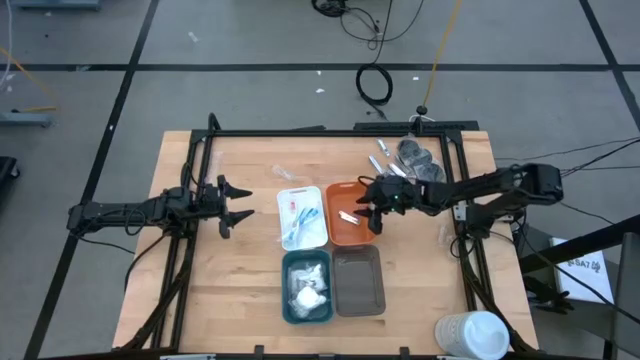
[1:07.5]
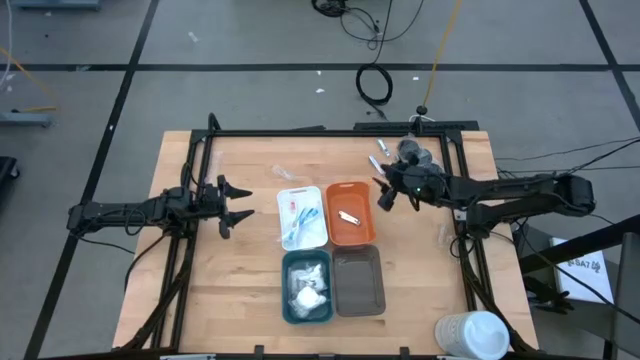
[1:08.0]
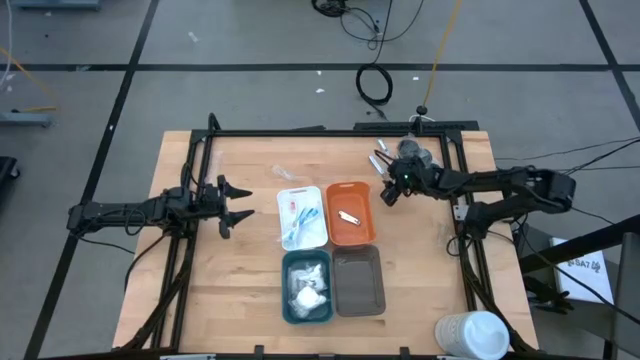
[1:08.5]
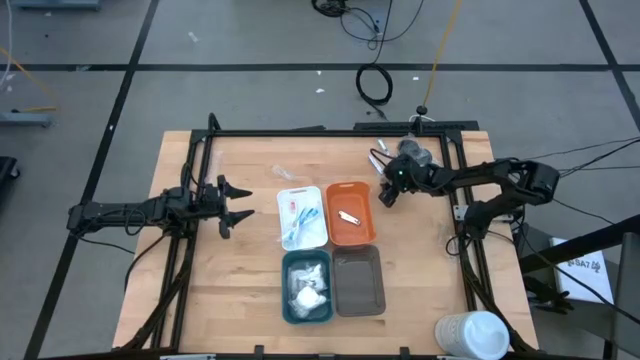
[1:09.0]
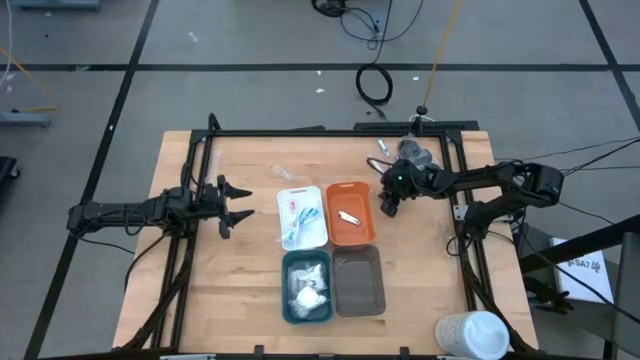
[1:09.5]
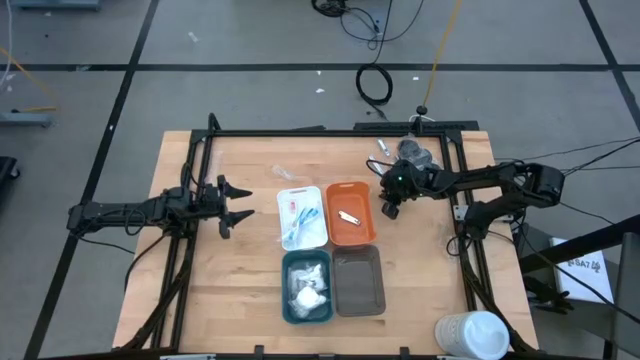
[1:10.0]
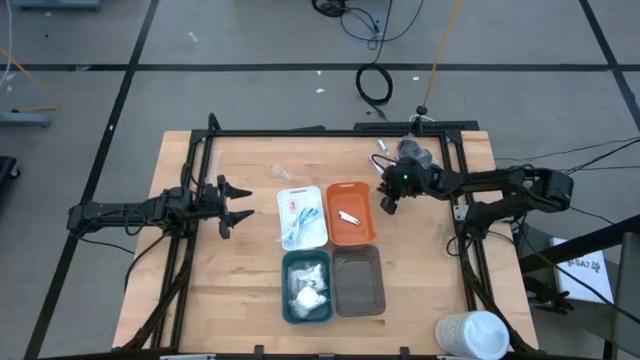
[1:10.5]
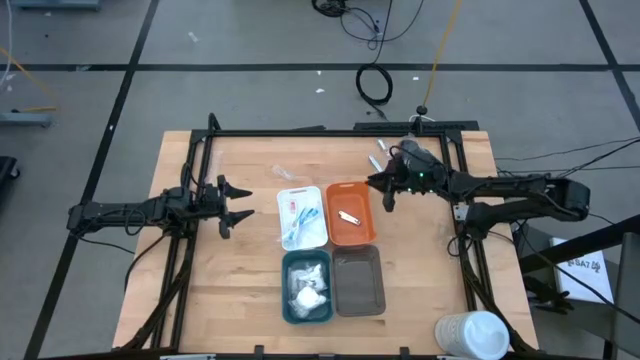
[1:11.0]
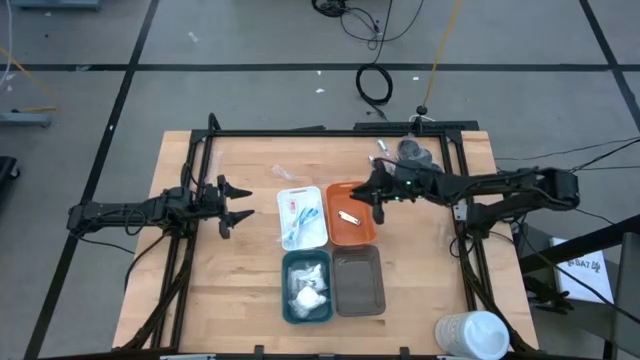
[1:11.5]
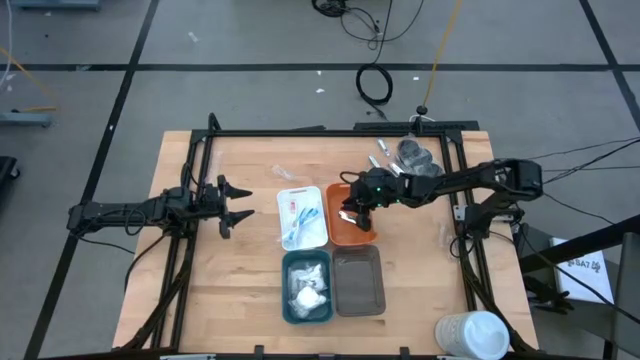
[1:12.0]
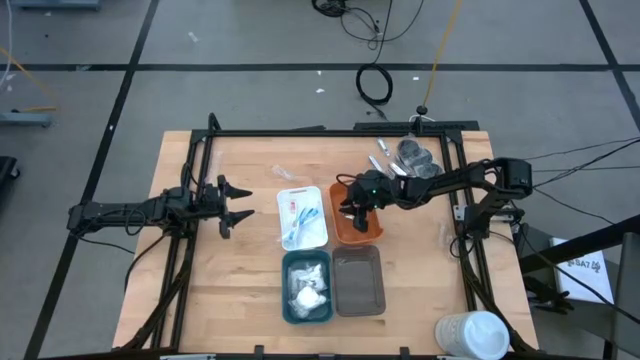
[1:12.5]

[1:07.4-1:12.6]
Task: Pick & Place Travel size toiletries
Put the nail cutter into the orange bin

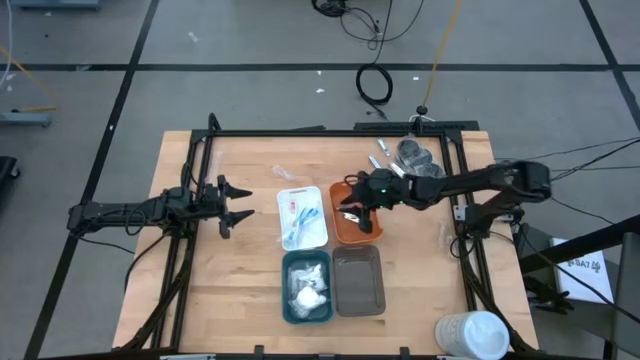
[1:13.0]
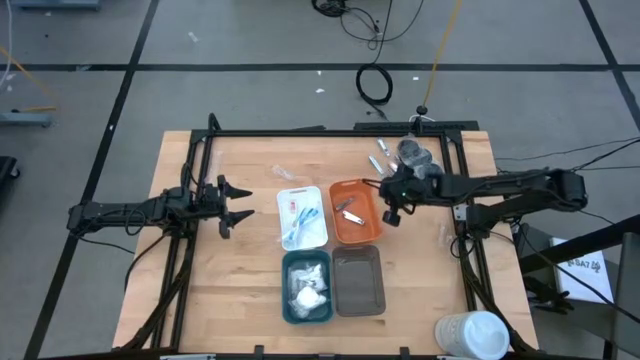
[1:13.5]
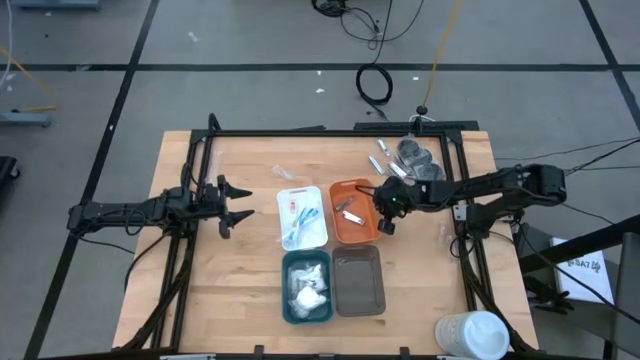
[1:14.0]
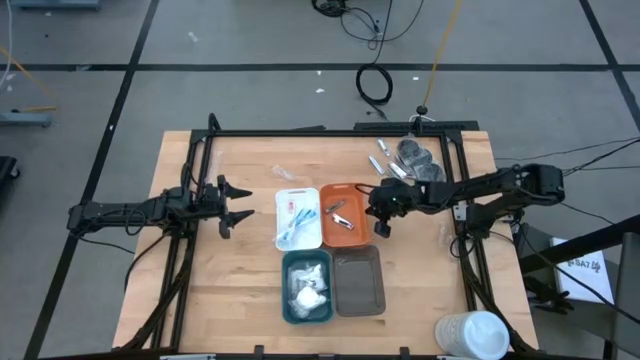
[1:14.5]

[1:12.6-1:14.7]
Adjust the orange bin on the table

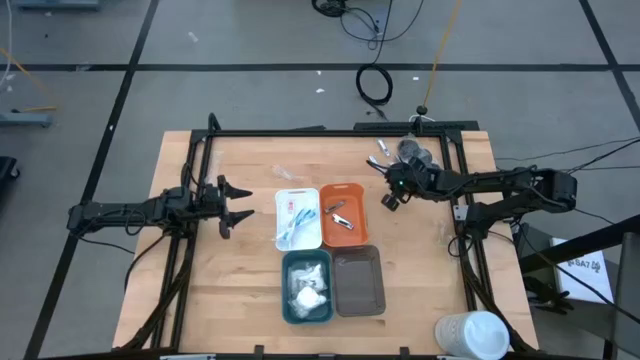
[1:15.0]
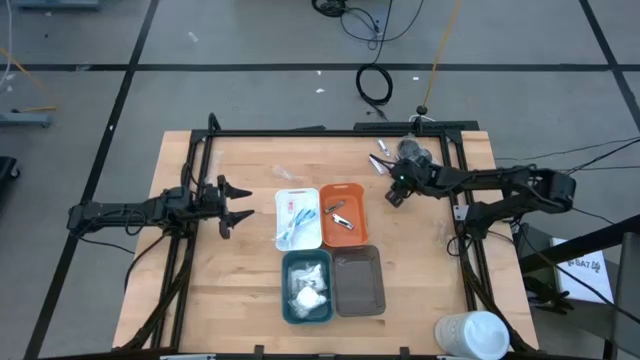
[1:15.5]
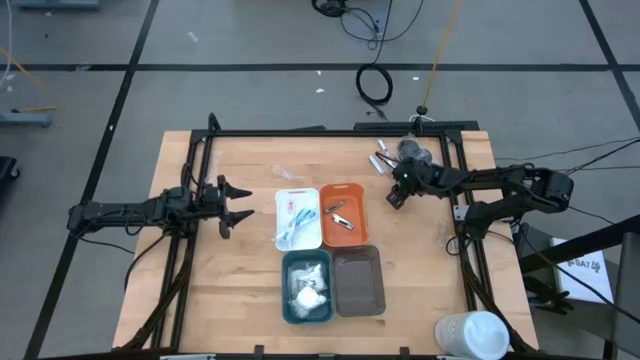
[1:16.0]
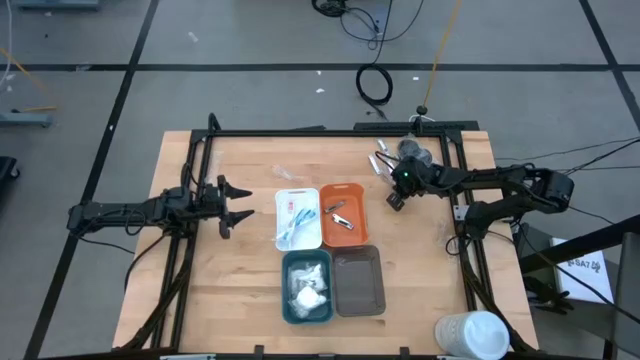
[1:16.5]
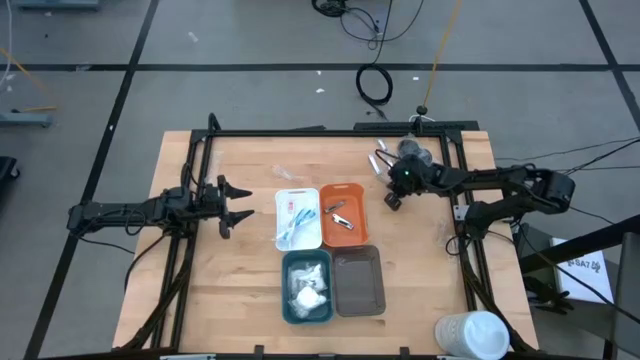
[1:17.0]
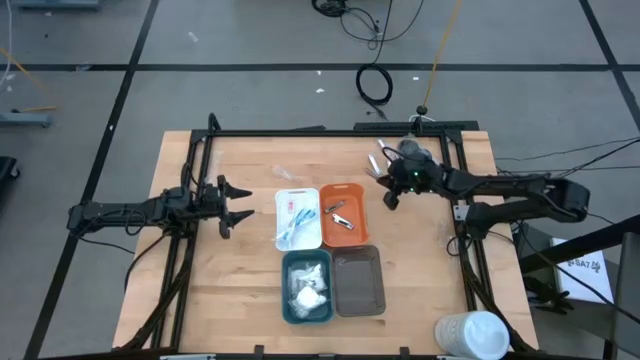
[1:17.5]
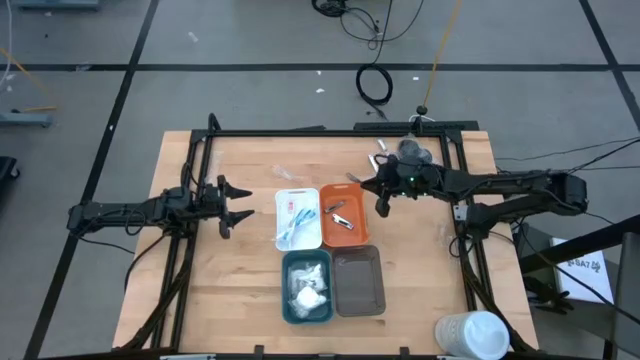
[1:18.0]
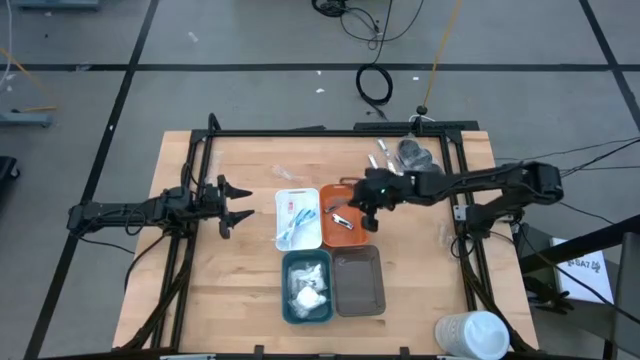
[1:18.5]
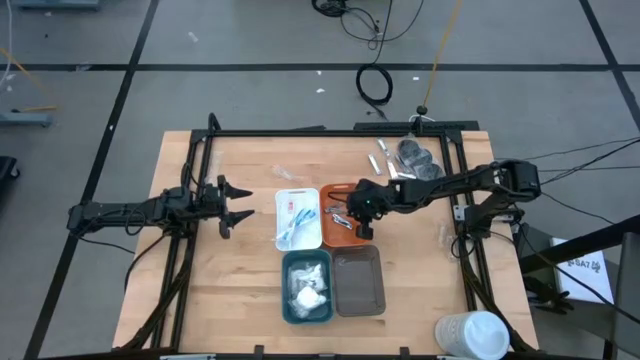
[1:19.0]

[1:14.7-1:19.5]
Put the nail cutter into the orange bin

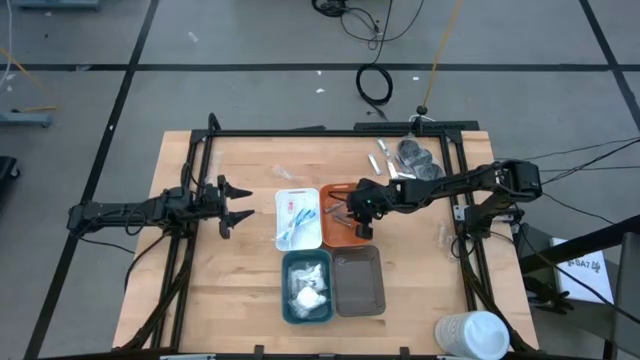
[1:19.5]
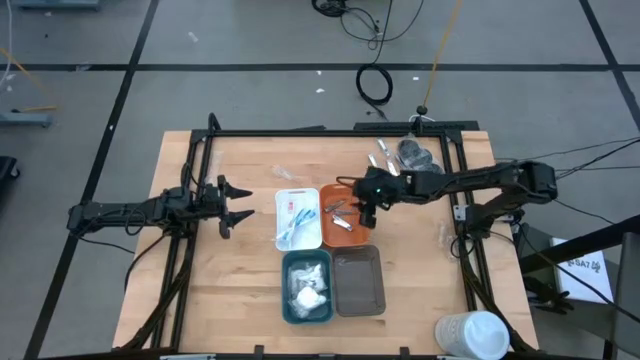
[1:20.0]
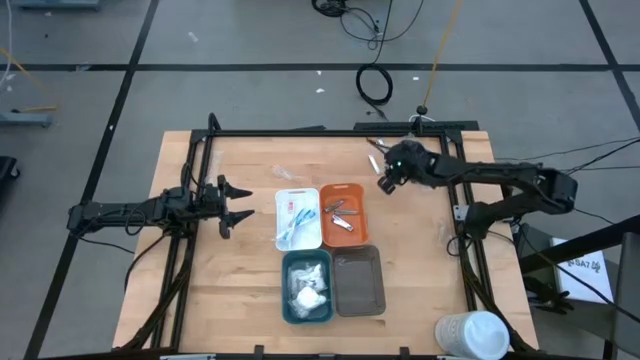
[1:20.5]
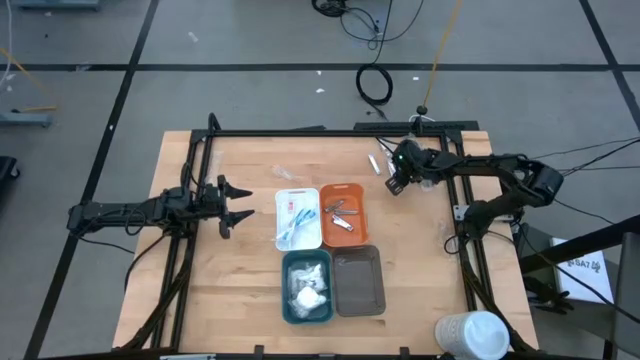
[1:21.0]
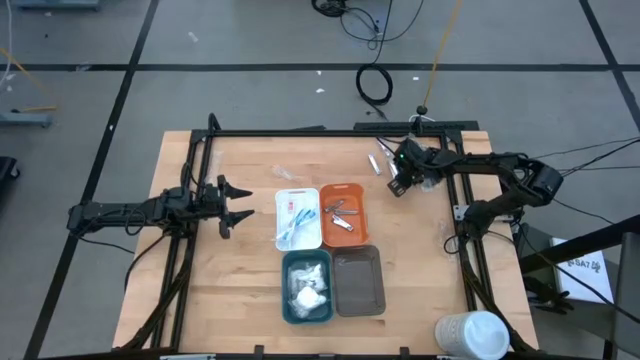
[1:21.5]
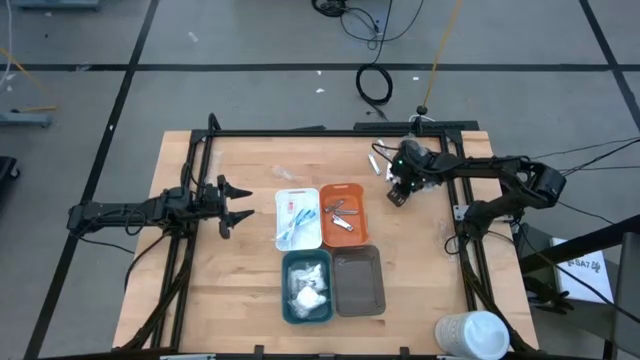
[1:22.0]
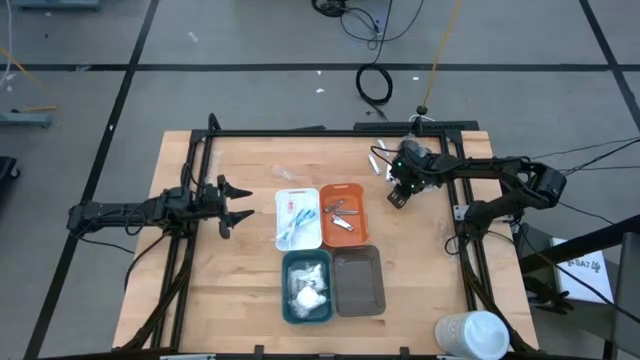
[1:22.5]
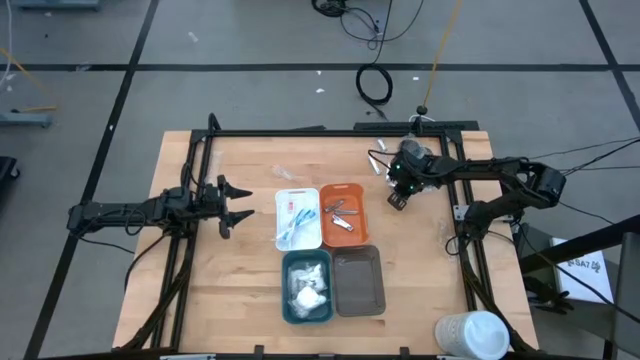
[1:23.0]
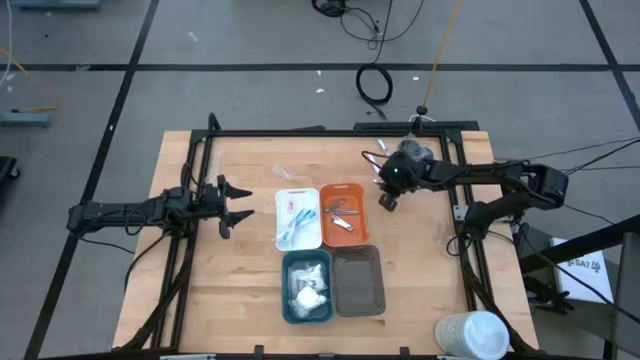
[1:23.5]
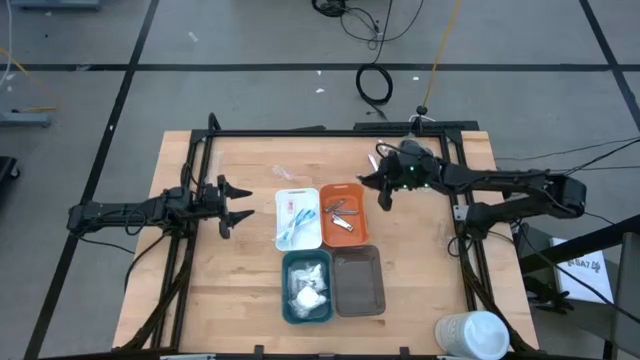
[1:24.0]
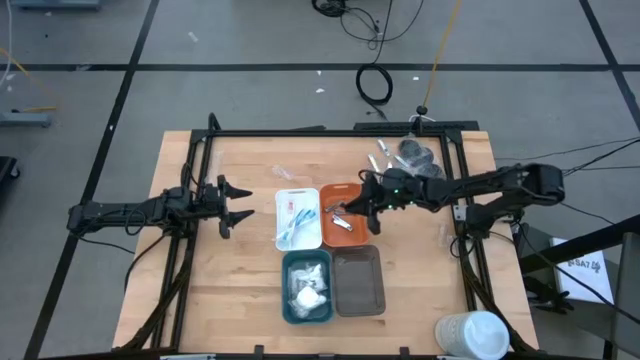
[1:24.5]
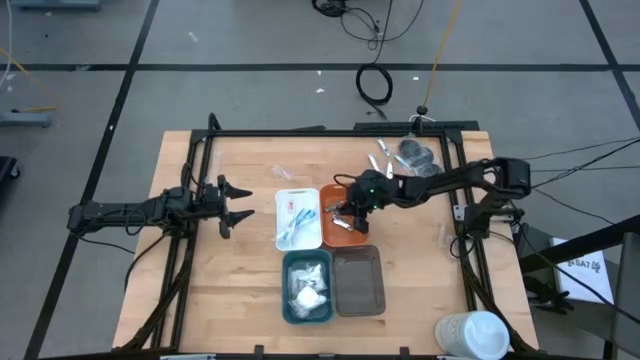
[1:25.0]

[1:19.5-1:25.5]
Put the nail cutter into the orange bin

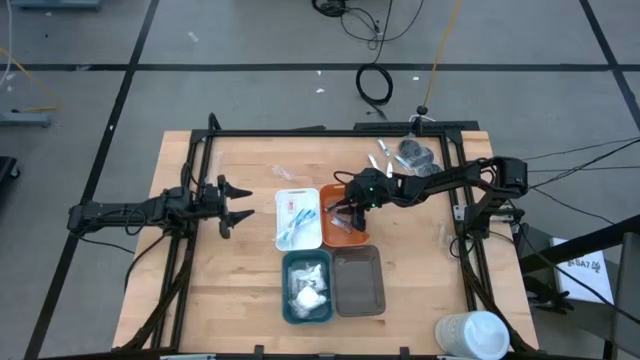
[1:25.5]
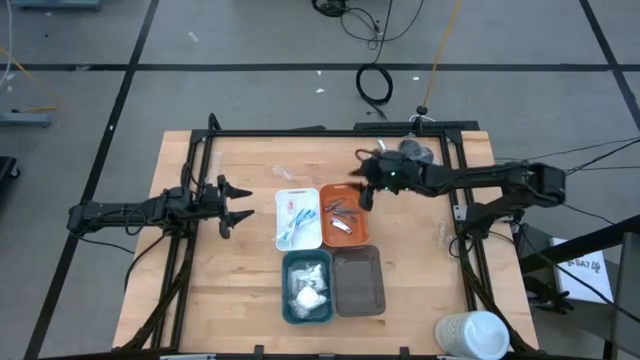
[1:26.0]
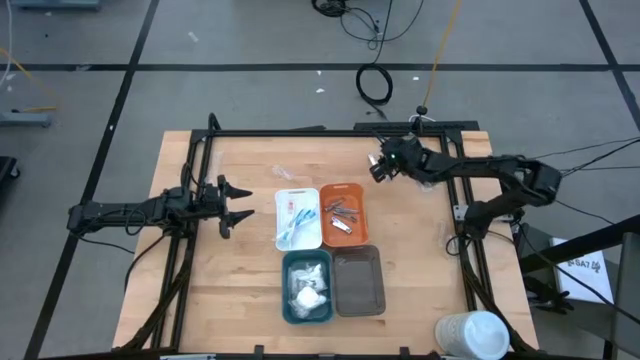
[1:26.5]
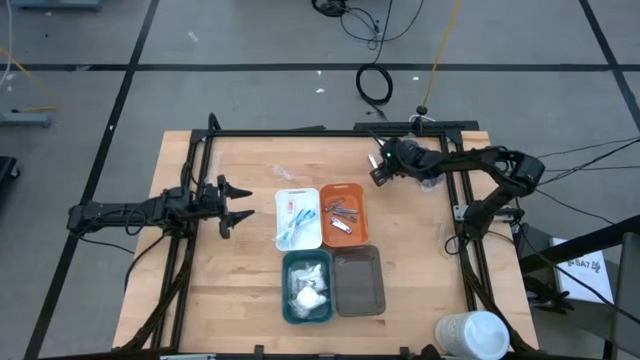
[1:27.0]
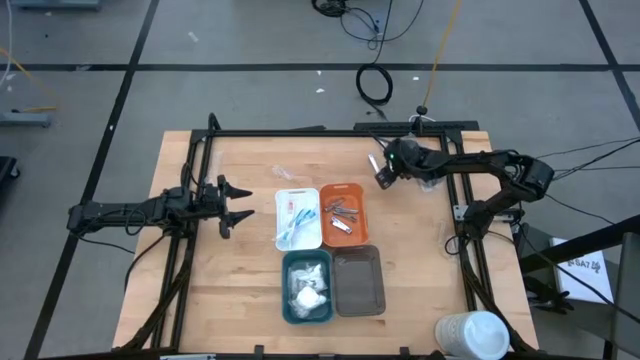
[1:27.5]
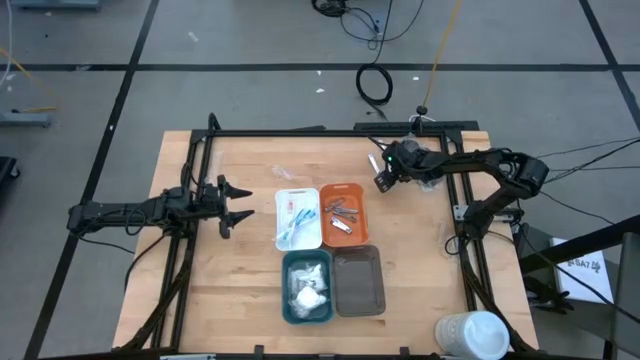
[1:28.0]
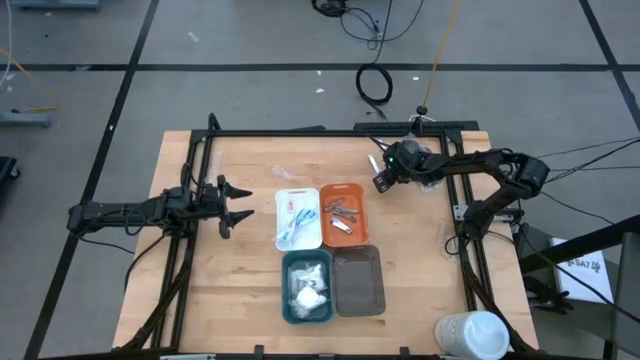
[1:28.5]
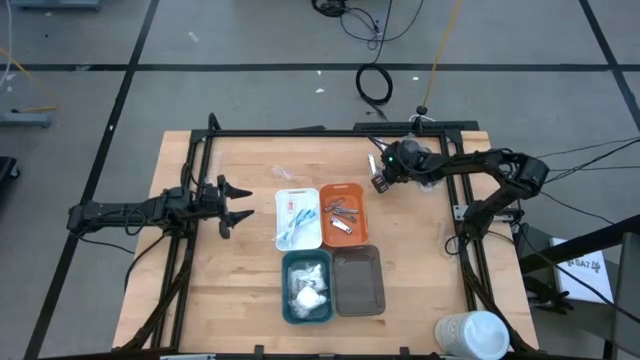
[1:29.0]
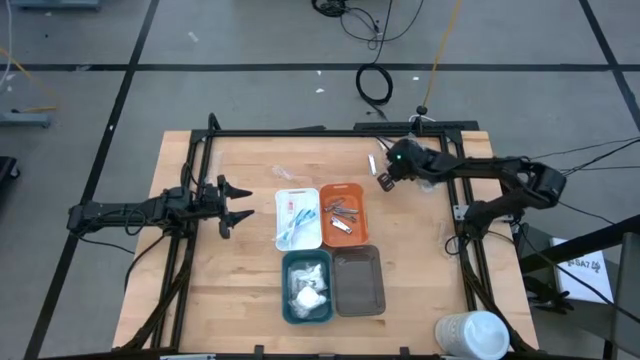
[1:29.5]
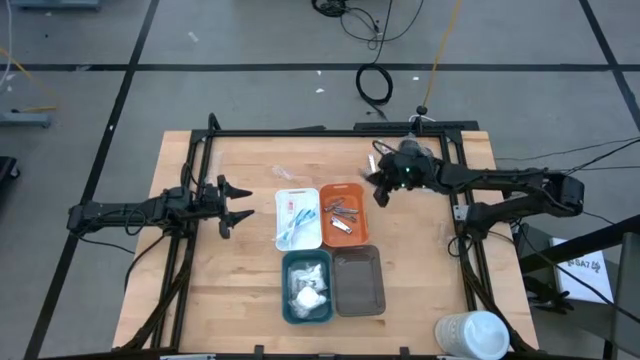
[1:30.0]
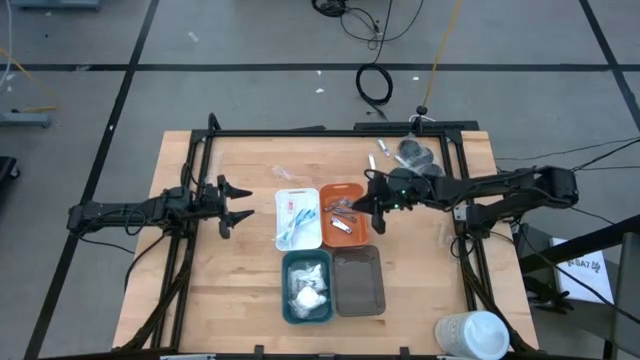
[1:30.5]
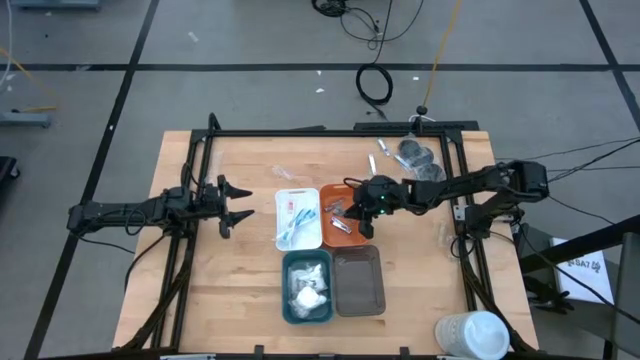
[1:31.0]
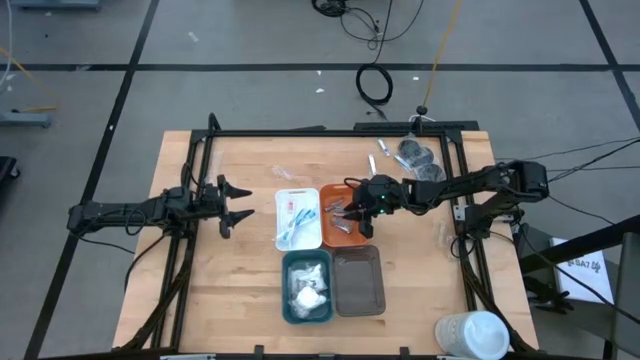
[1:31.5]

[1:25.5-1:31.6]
Put the nail cutter into the orange bin
